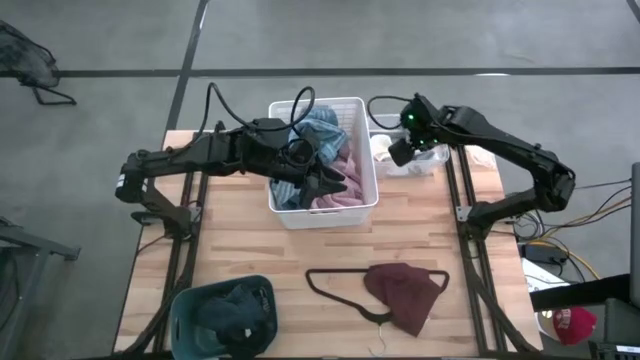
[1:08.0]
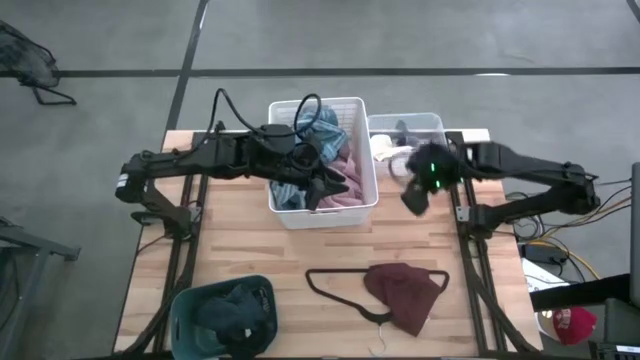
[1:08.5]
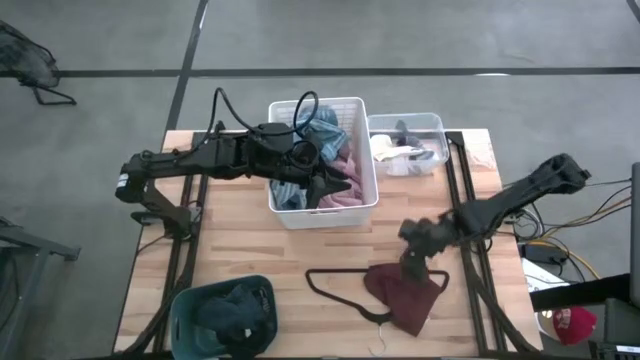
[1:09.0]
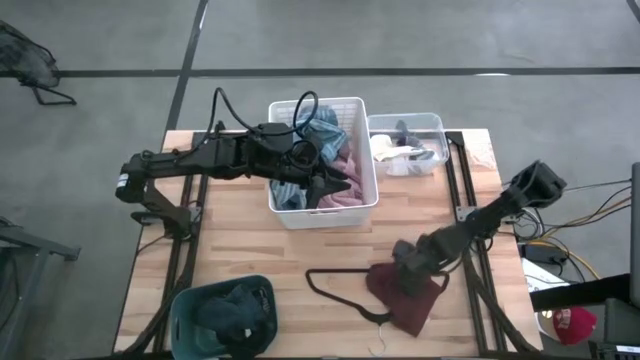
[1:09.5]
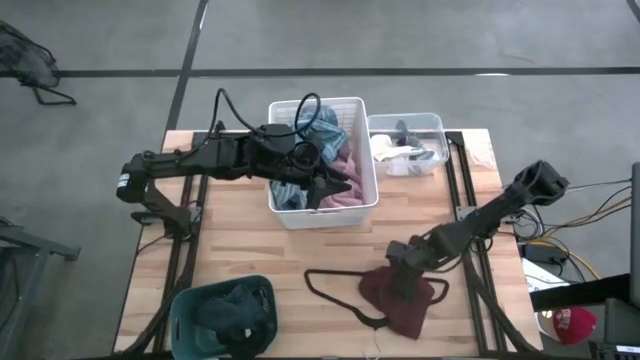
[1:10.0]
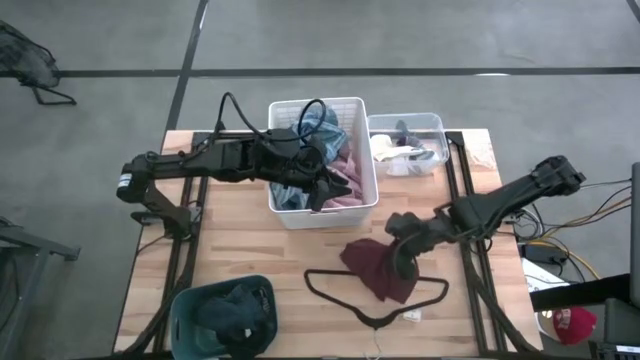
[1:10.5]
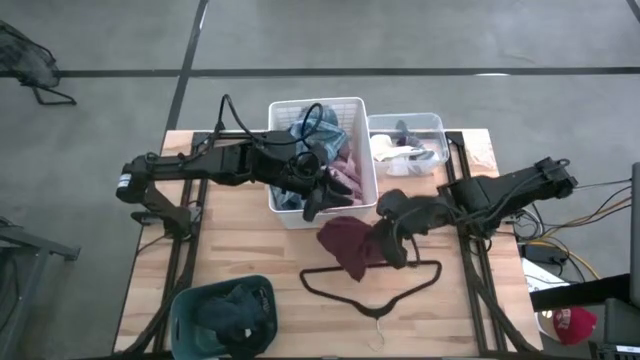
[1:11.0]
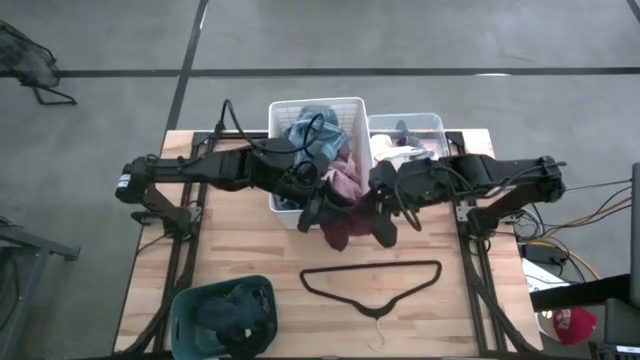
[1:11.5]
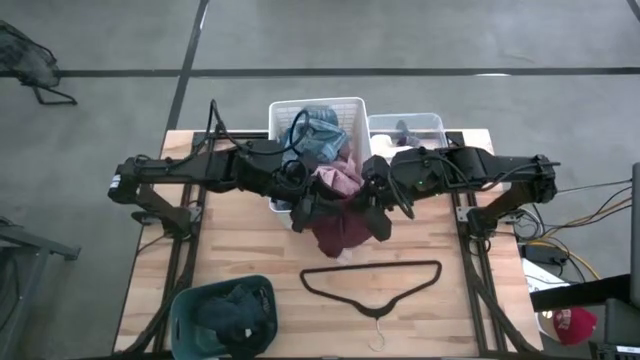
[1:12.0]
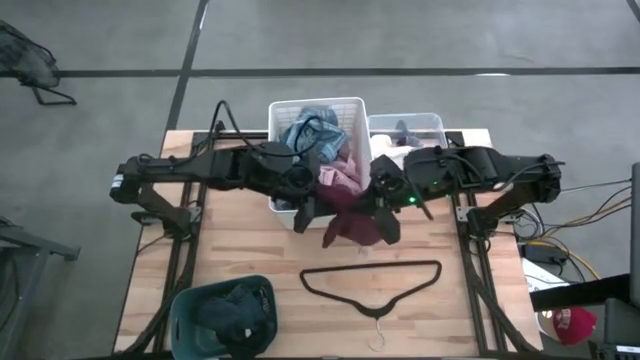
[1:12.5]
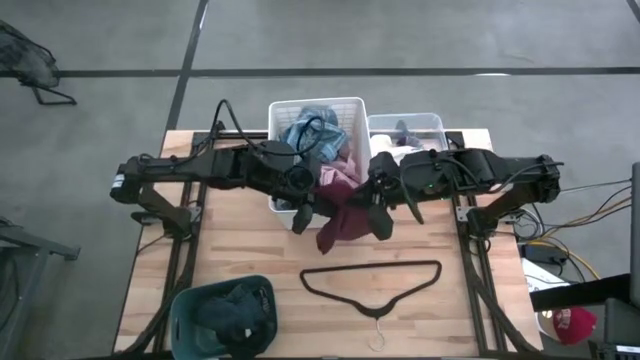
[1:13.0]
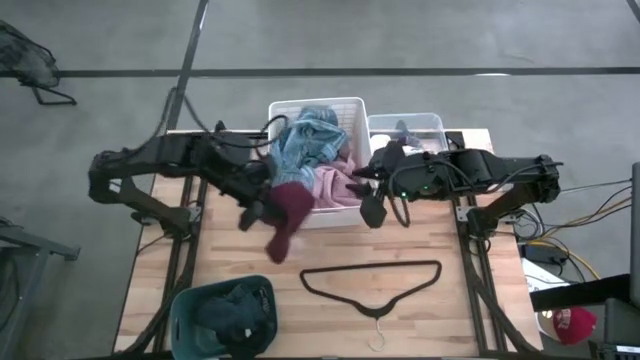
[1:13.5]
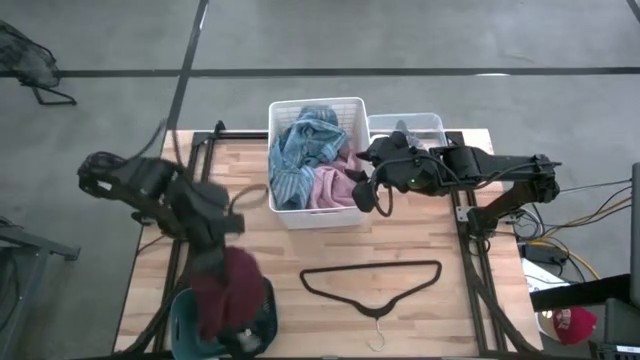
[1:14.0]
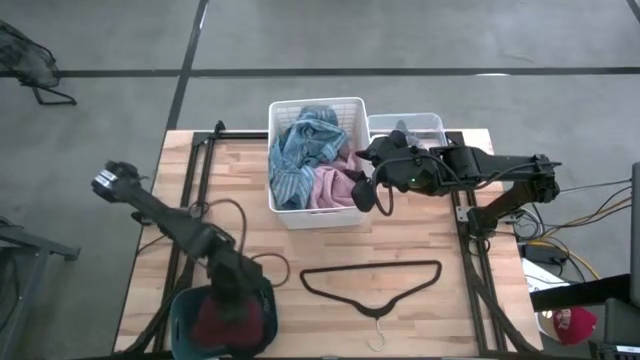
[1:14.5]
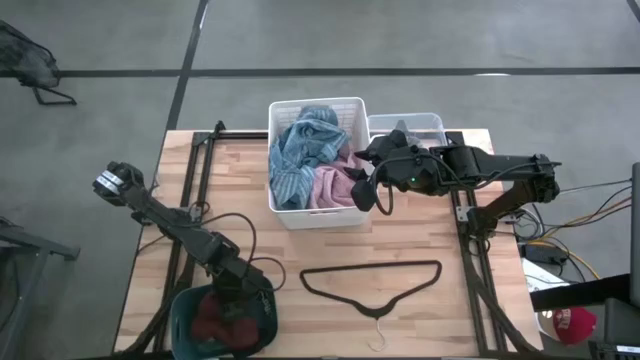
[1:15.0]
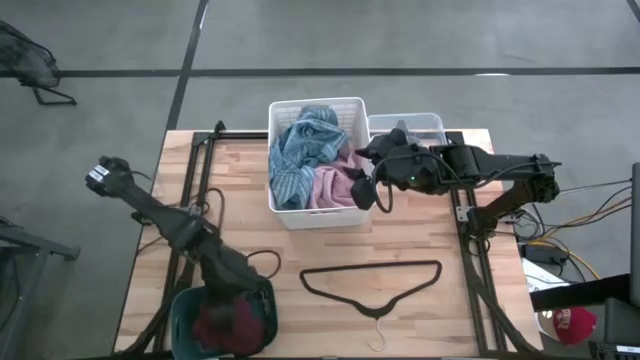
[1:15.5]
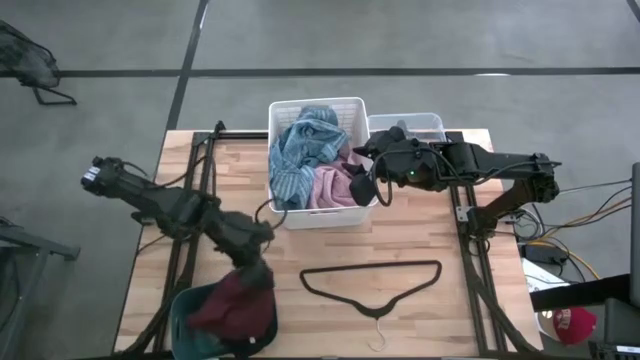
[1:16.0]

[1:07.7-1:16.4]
Task: Pick & Place Cloths
Put the red shirt into the green bin

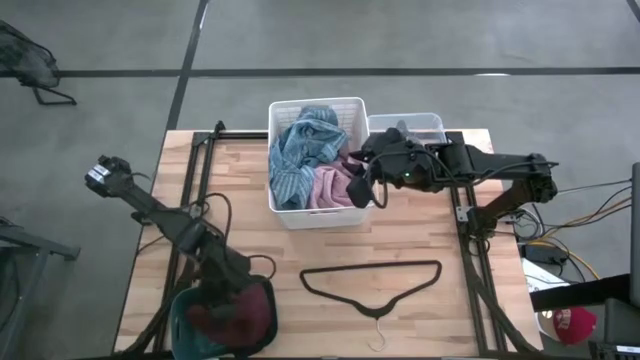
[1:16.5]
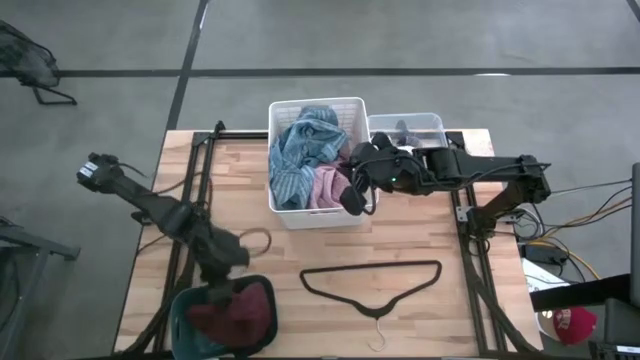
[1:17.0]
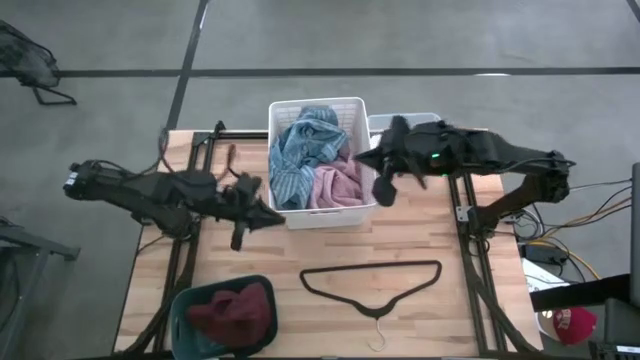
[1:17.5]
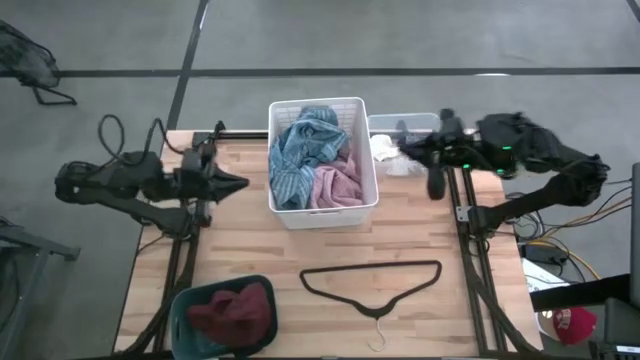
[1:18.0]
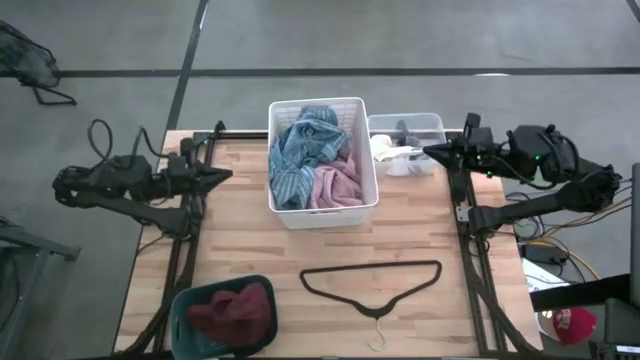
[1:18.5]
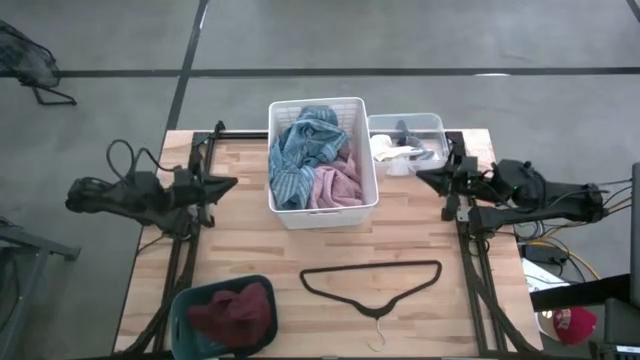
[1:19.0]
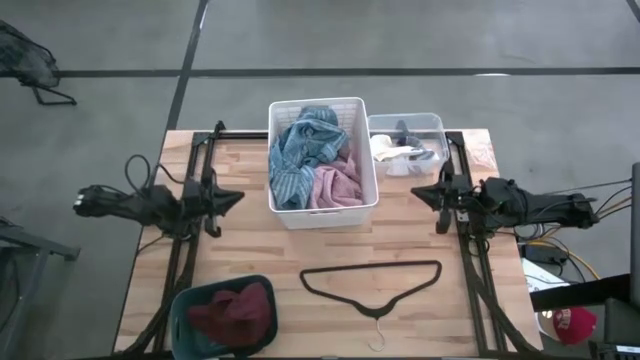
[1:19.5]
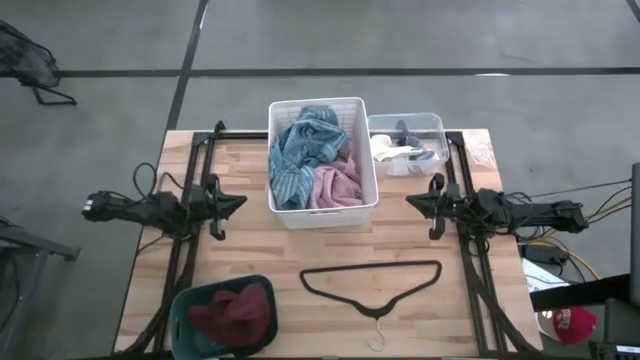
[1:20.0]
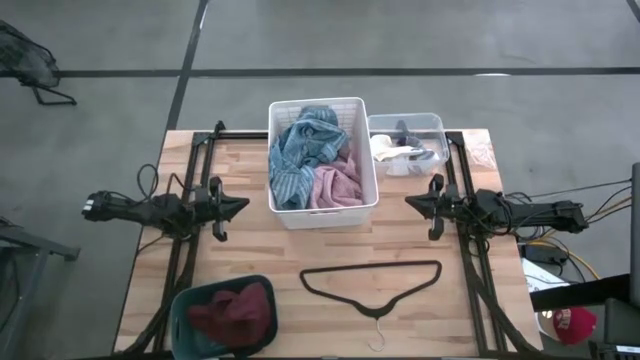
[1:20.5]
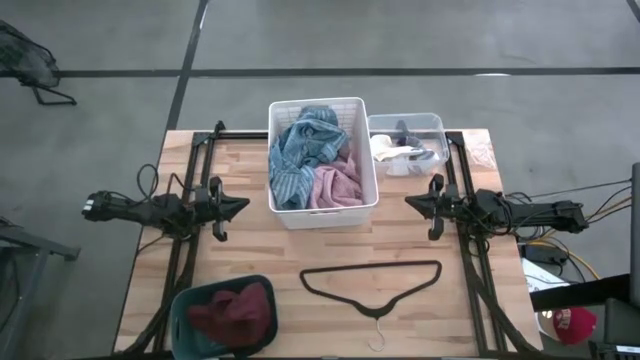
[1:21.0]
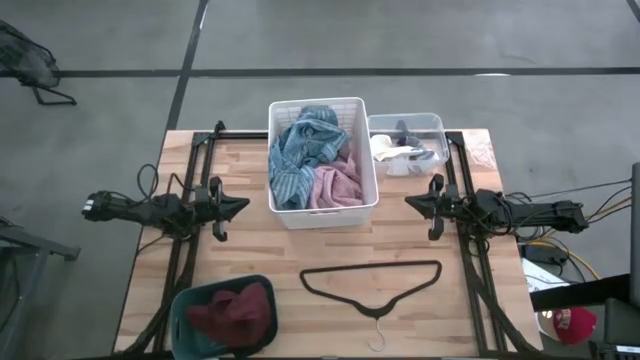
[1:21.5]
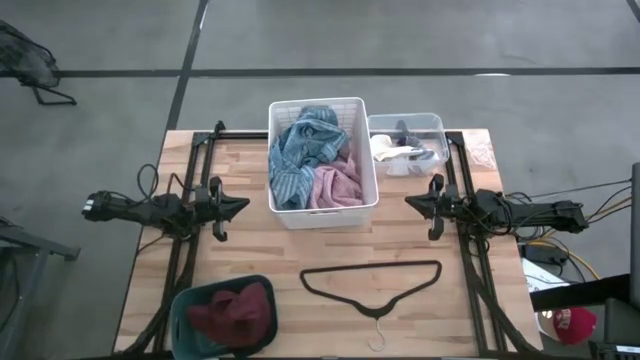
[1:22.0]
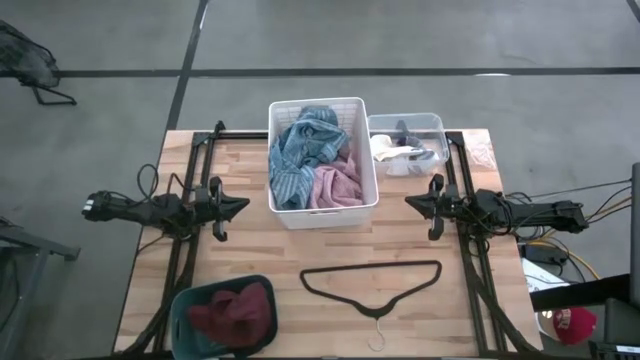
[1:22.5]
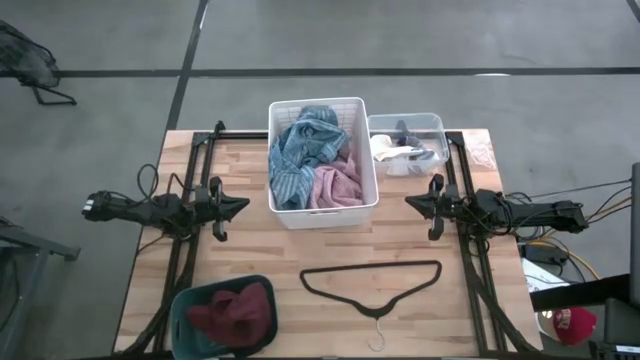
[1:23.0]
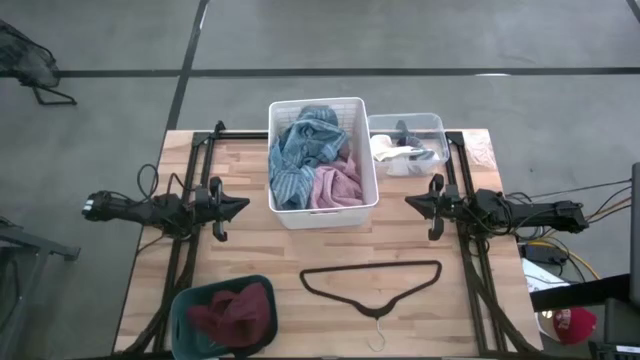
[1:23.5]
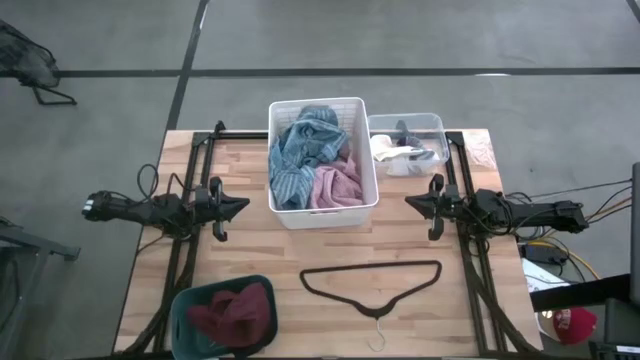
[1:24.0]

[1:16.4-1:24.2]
Return to Home Position

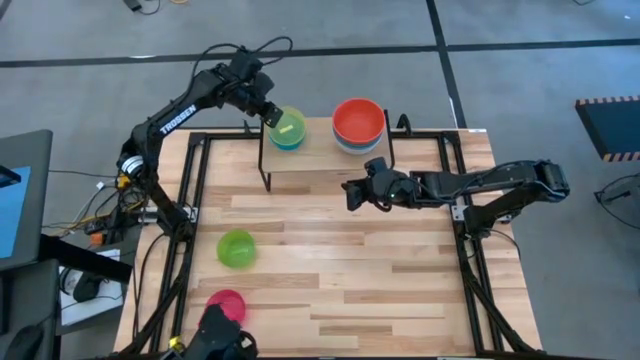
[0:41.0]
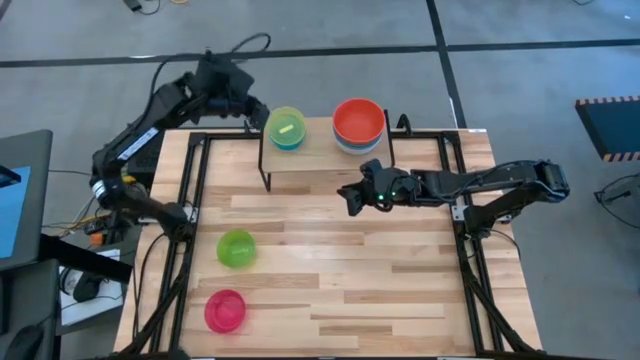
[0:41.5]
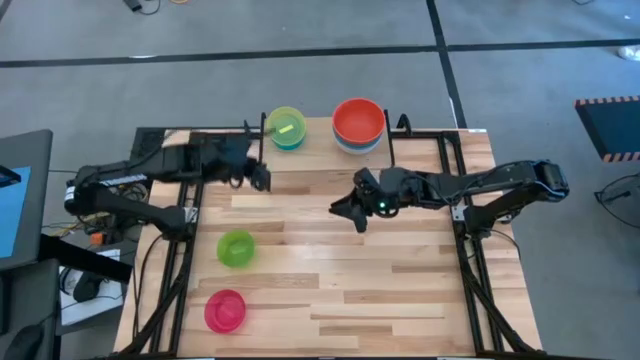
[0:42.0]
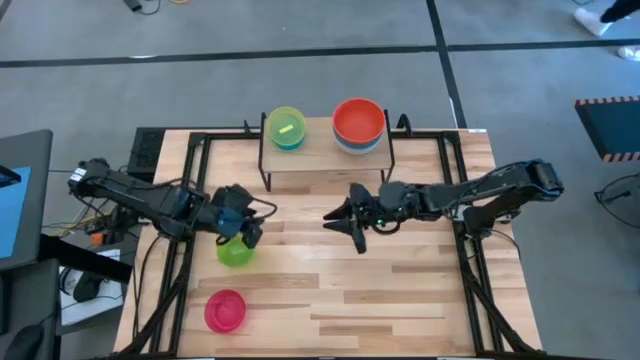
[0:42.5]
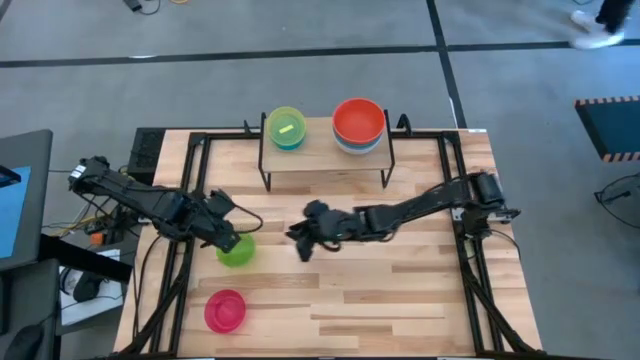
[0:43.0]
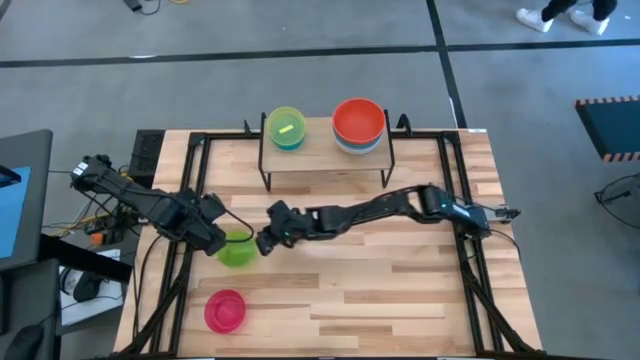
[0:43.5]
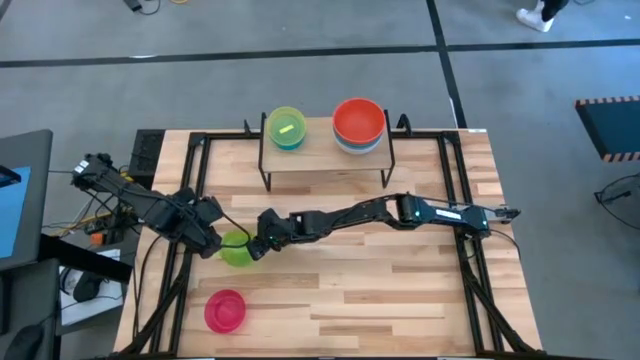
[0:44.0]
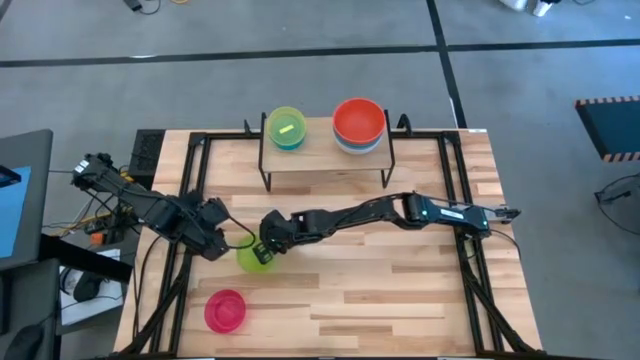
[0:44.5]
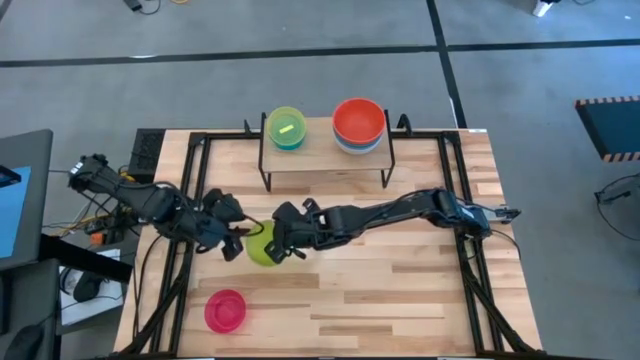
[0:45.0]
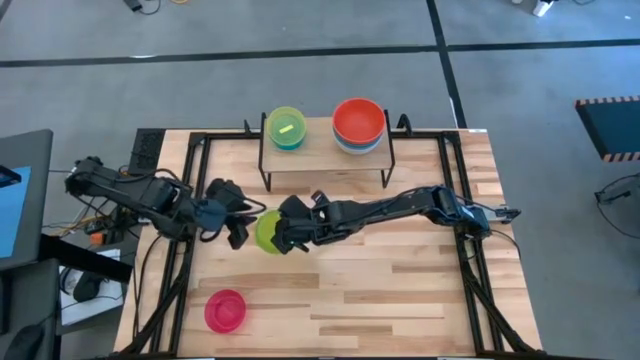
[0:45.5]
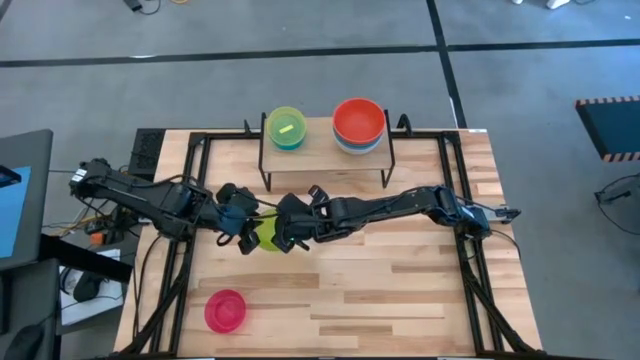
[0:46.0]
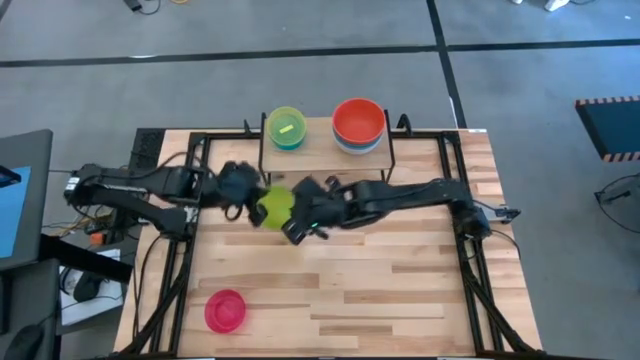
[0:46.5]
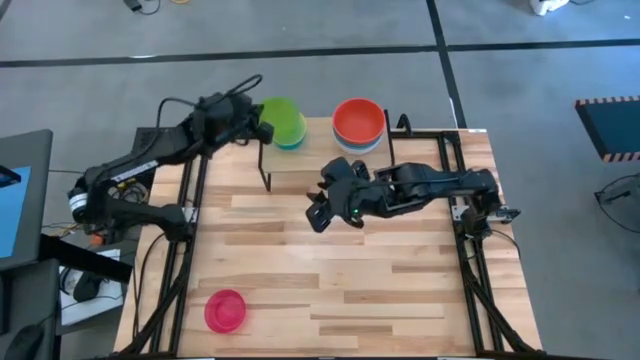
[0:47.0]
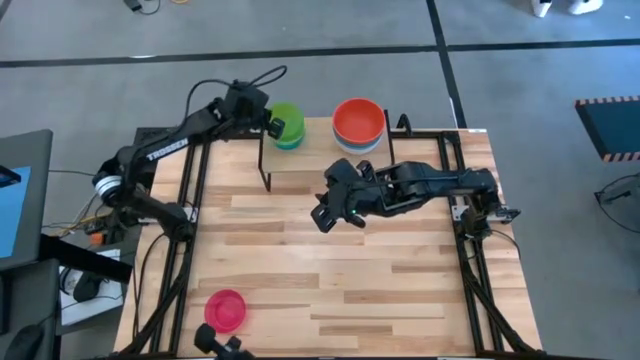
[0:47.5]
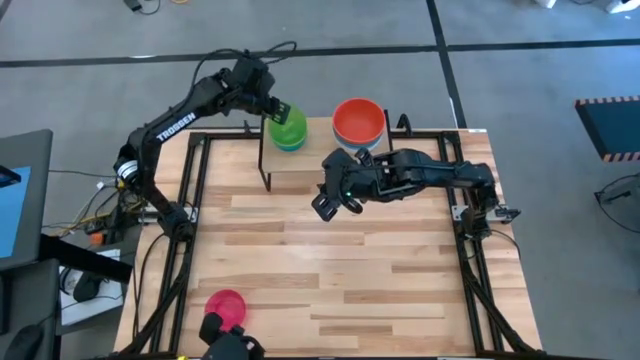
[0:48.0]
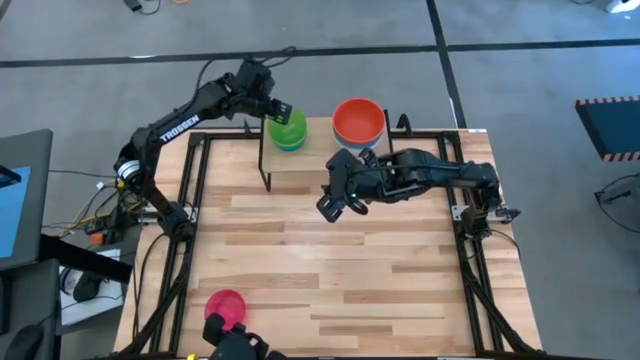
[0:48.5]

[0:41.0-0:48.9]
Task: Place and stack bowls onto a shelf
Stack the small green bowl on top of the small yellow bowl on the shelf
